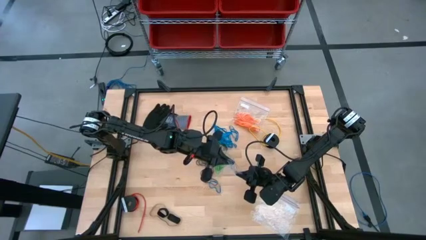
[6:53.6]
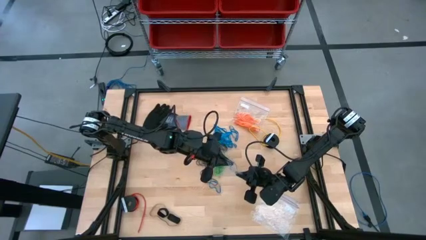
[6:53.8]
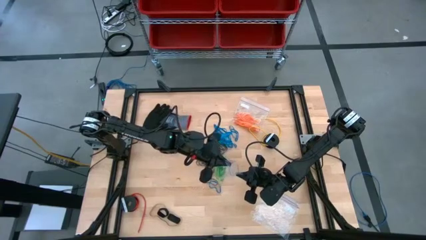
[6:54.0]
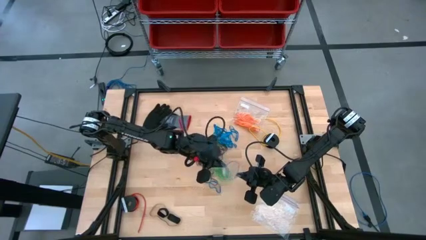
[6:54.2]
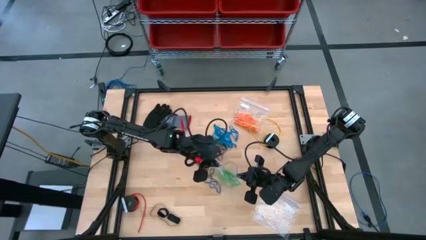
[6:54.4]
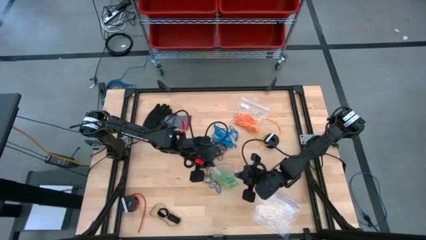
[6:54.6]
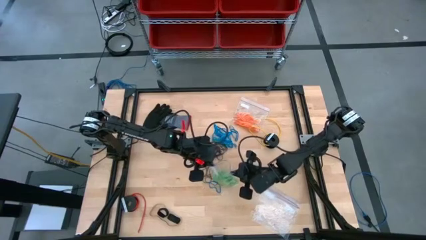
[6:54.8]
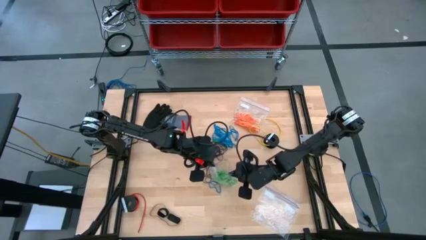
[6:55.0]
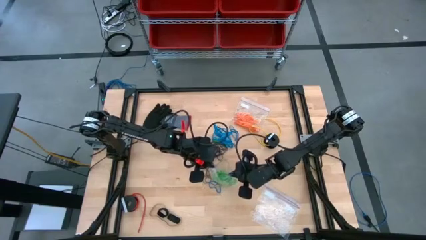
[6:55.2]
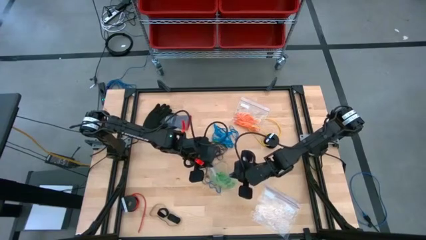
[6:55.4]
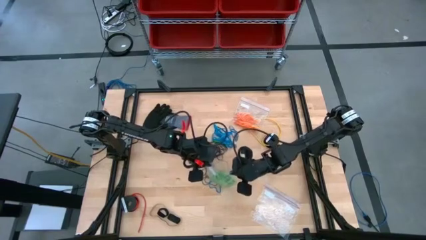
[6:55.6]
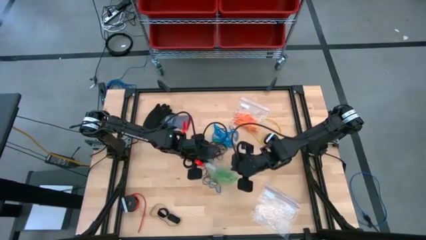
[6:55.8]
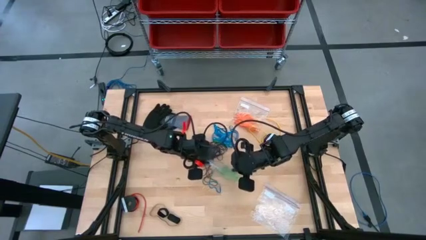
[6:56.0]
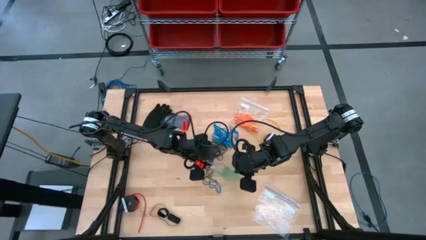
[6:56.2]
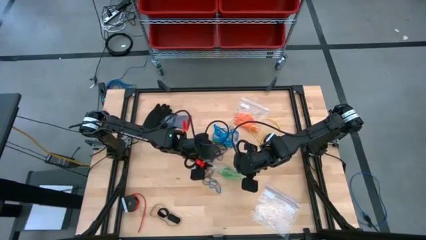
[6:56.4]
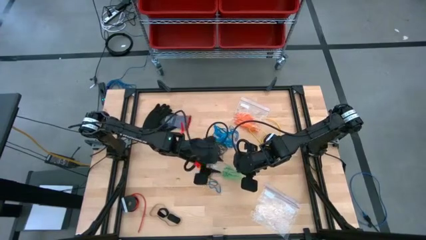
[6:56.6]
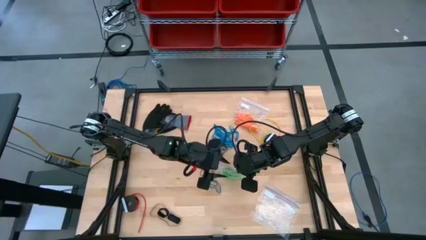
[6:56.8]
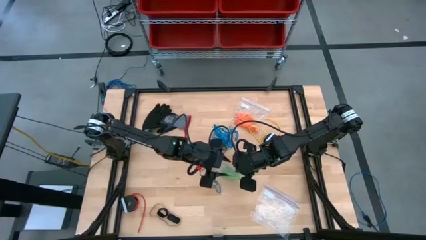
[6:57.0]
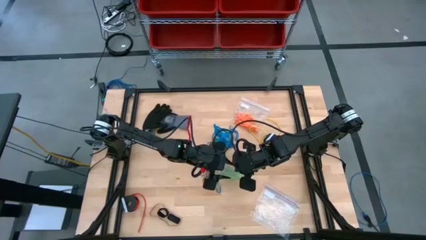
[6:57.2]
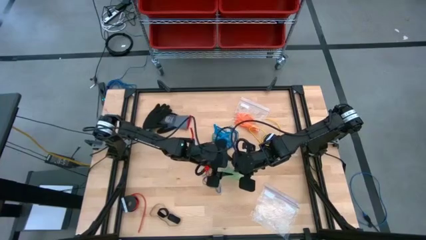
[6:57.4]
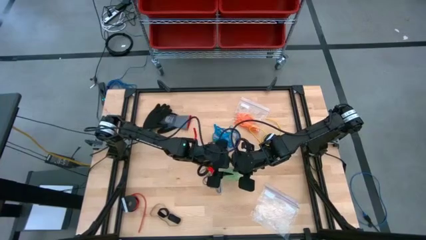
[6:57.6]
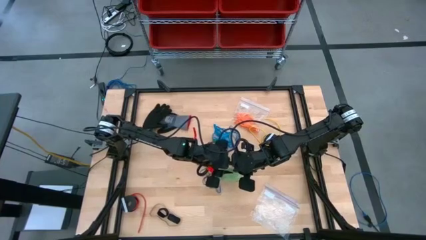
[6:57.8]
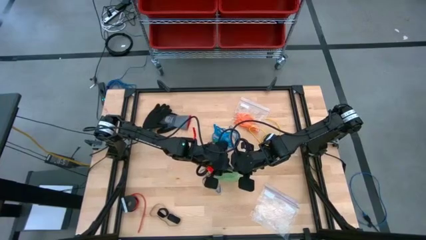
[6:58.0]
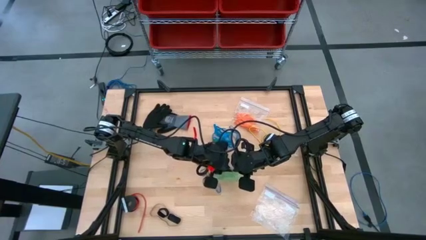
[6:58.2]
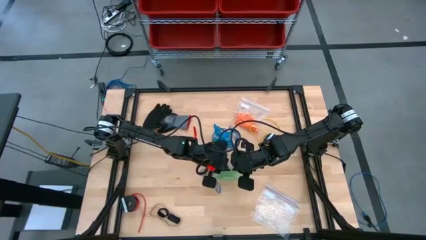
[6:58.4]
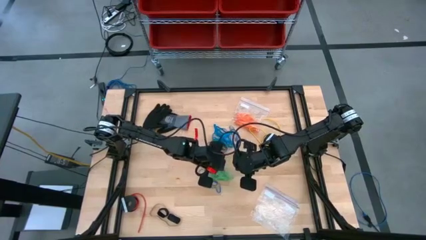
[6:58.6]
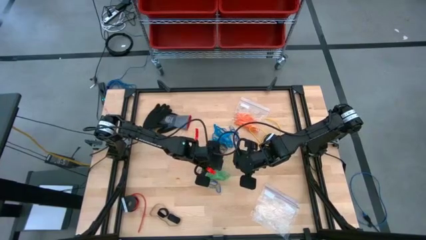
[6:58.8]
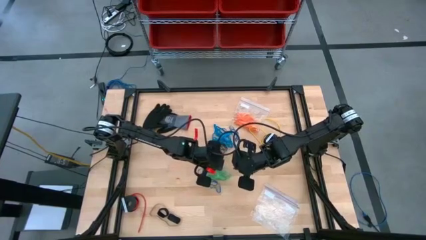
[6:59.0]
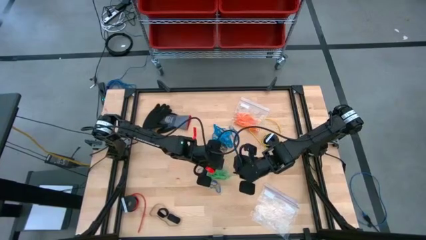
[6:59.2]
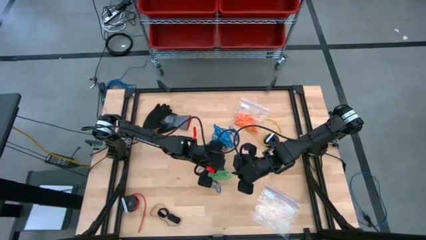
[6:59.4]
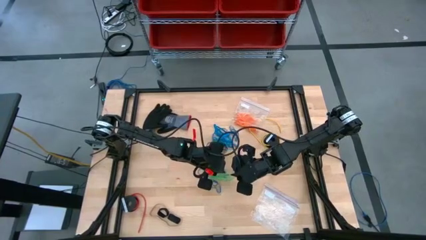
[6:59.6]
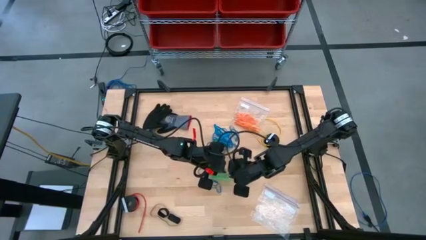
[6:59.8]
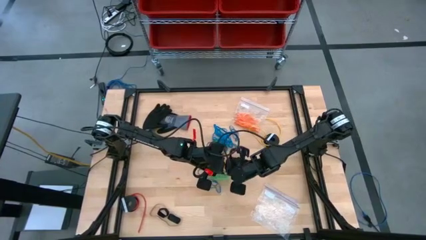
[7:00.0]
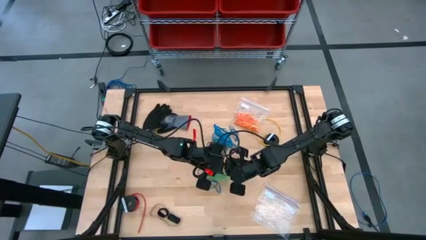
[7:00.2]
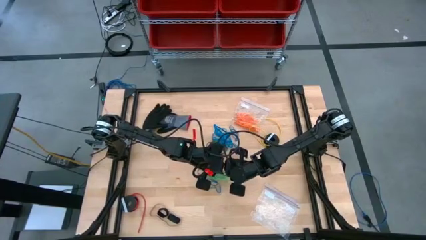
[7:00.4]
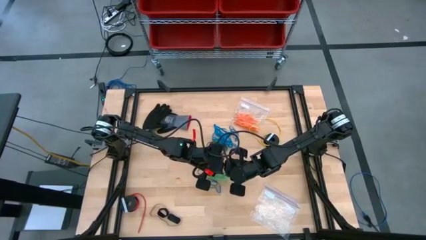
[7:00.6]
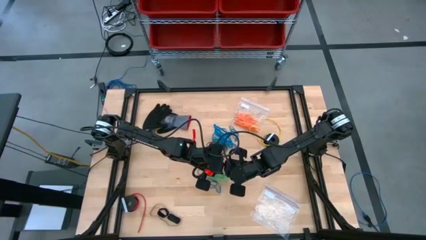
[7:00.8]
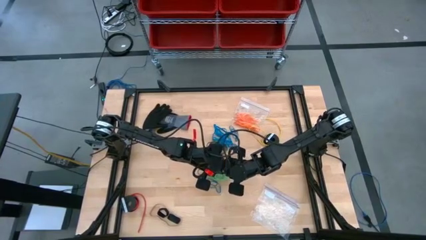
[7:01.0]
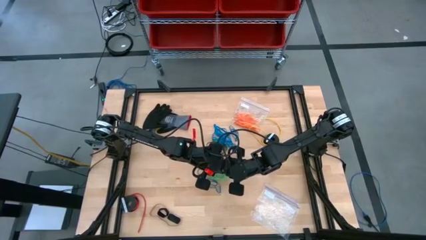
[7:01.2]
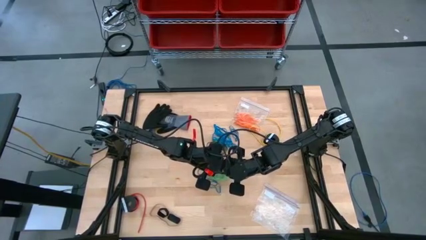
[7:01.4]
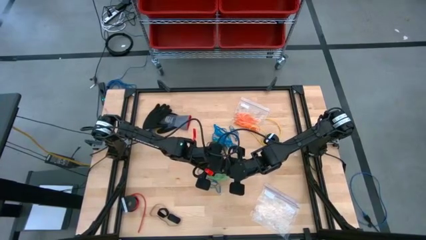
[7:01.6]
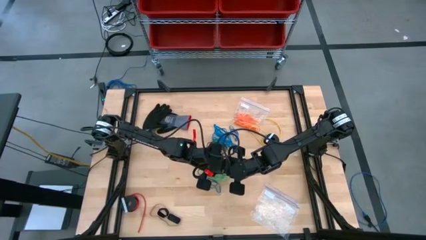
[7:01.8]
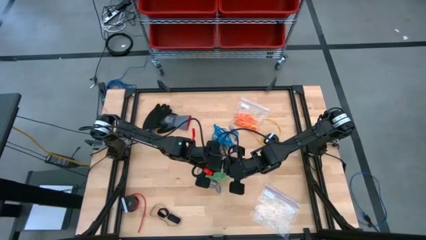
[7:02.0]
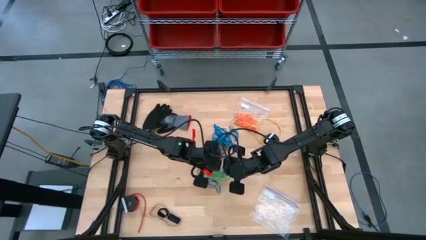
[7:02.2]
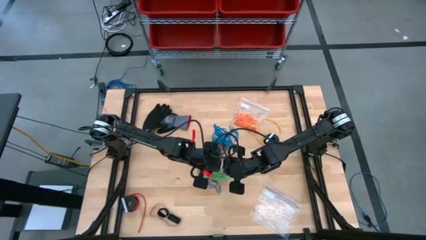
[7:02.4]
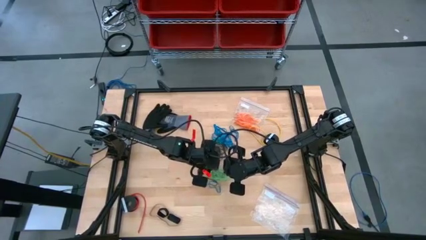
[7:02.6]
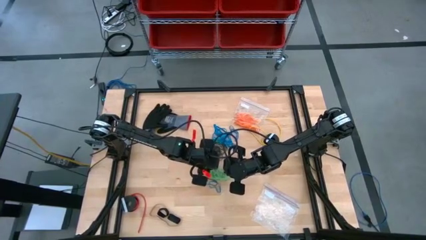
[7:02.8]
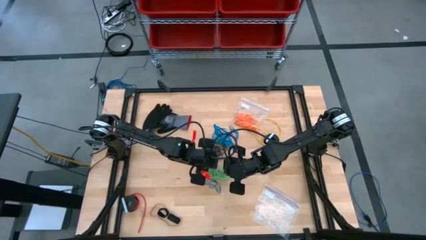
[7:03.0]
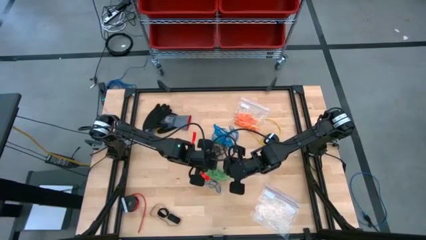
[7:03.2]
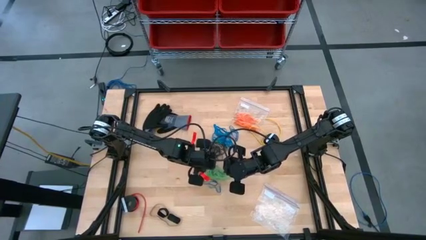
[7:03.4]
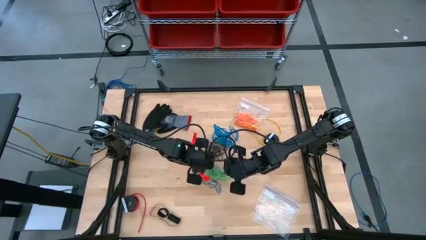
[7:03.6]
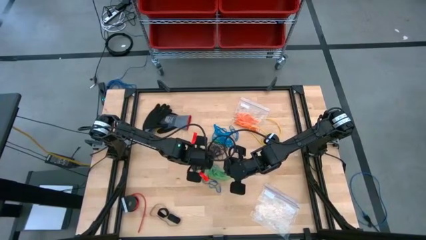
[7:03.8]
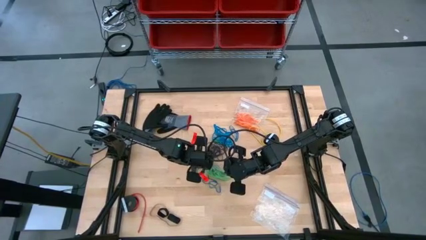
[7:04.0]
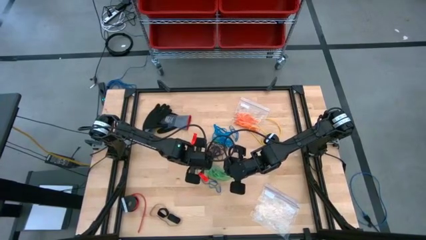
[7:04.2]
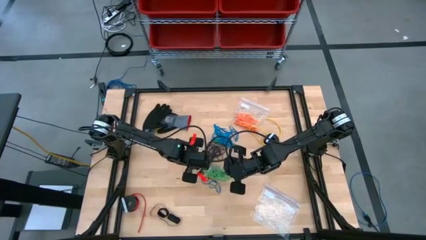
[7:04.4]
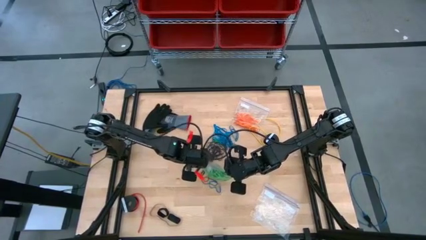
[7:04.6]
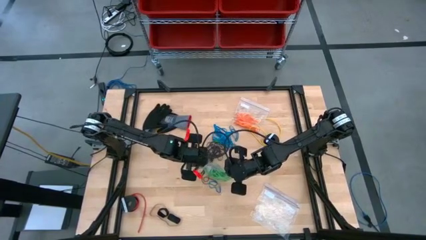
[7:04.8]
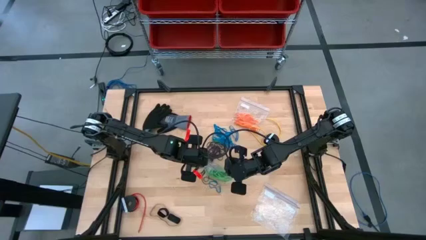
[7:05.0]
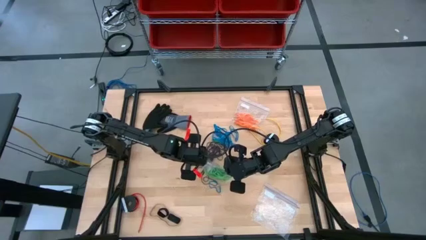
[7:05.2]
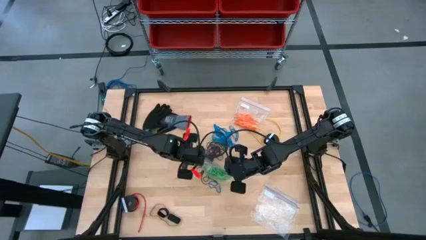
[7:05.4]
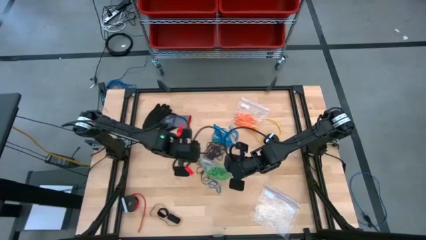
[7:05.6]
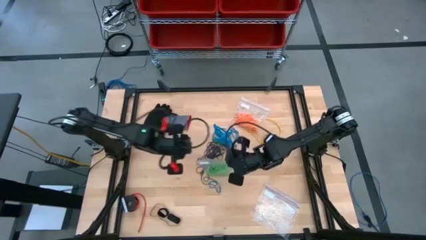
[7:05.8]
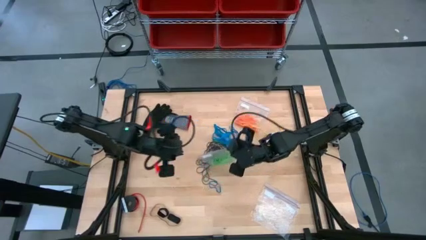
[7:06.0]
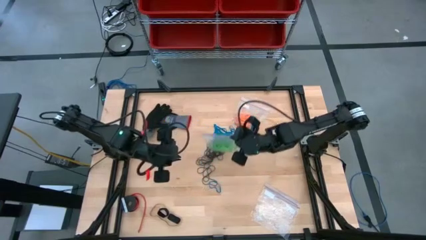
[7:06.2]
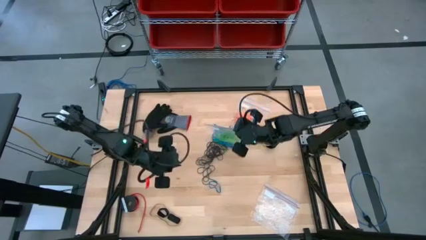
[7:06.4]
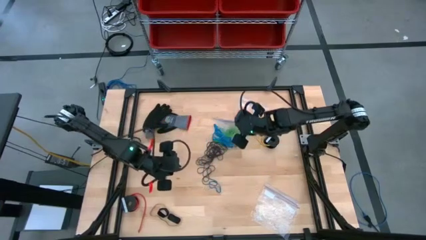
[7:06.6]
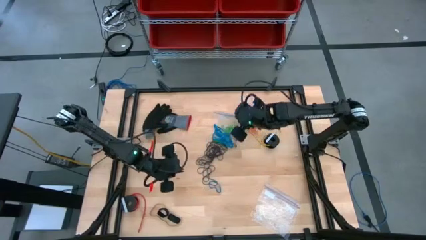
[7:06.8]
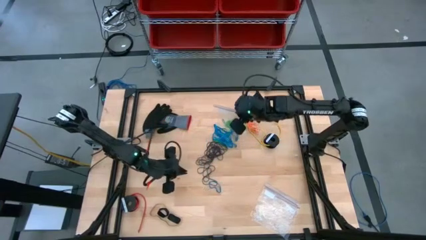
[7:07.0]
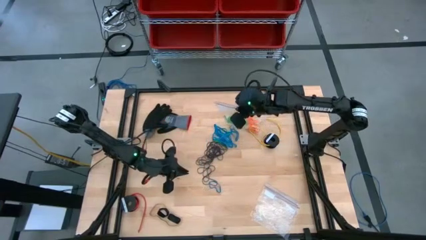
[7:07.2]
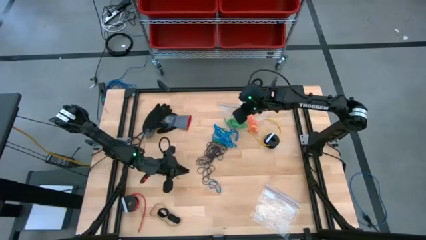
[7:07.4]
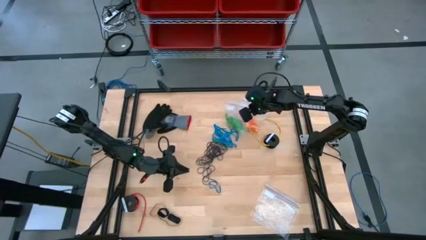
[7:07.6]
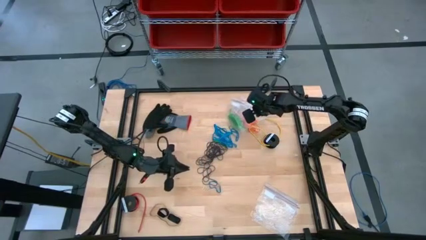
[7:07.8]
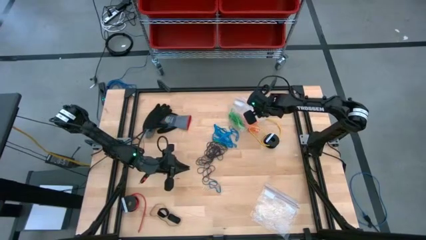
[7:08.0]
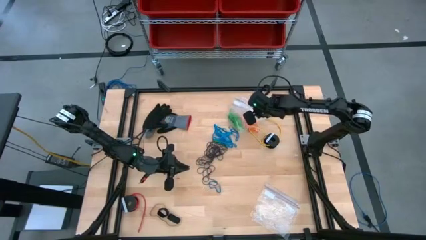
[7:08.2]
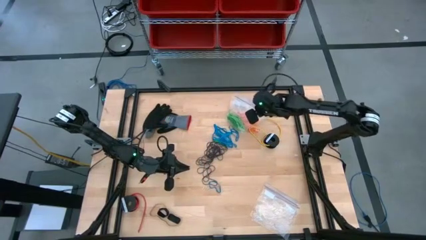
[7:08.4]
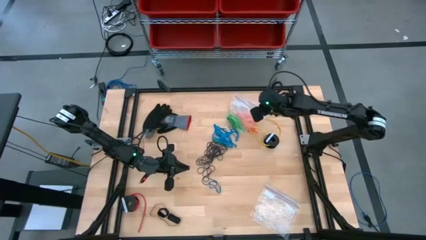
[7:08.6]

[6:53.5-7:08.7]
Task: Sort rubber bands
Close the transparent zip bag

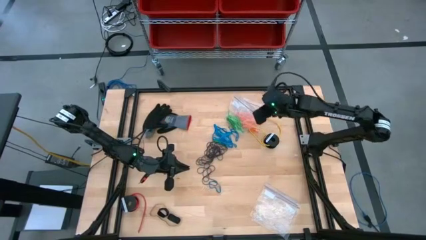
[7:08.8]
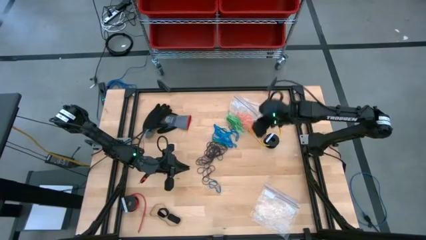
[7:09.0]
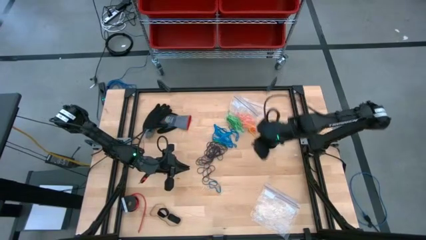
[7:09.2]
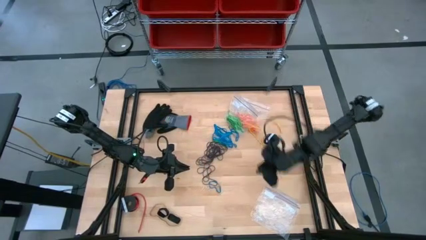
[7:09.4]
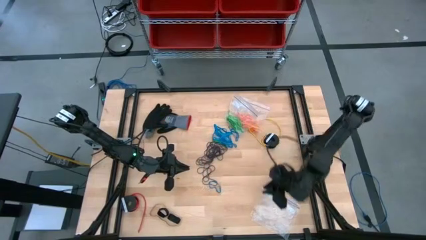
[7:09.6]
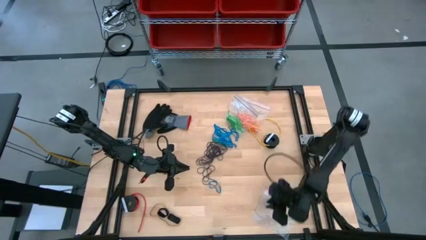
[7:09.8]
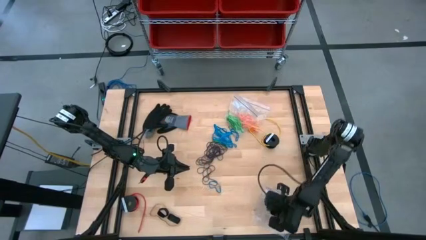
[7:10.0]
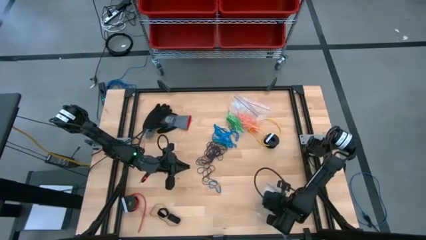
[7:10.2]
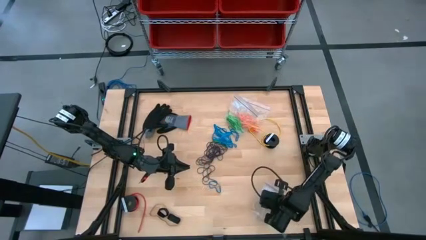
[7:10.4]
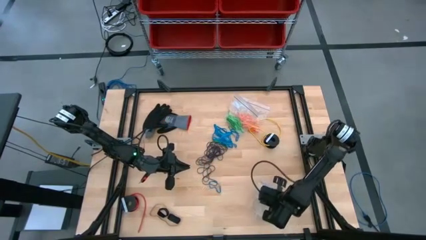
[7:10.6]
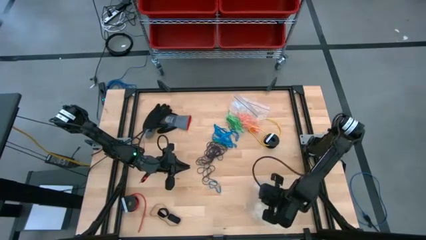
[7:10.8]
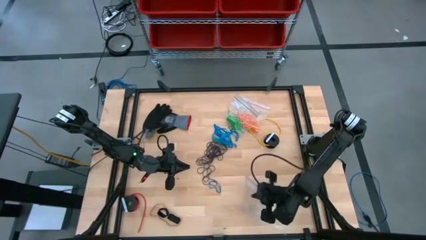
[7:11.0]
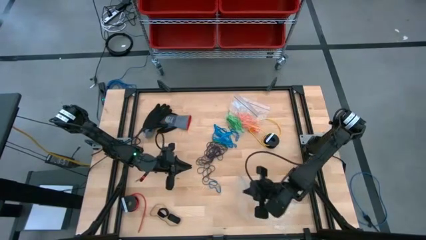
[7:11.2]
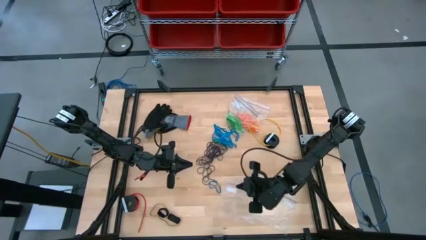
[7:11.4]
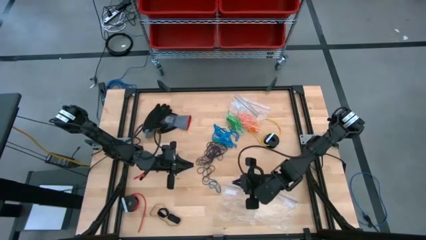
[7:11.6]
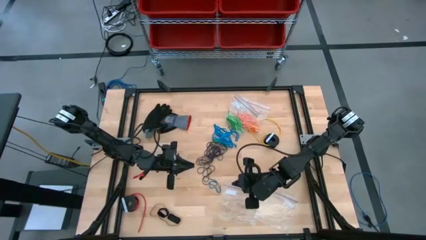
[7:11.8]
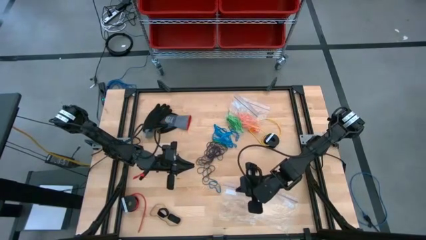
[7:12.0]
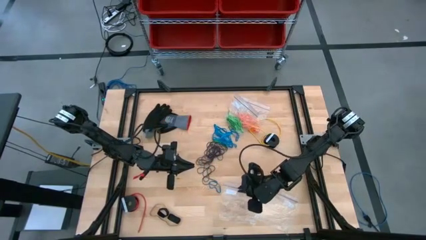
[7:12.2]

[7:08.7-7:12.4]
Open the transparent zip bag
